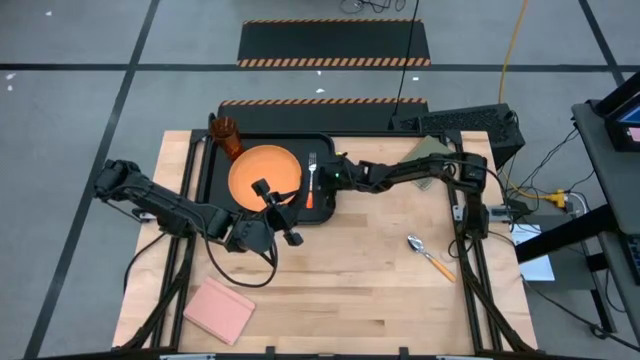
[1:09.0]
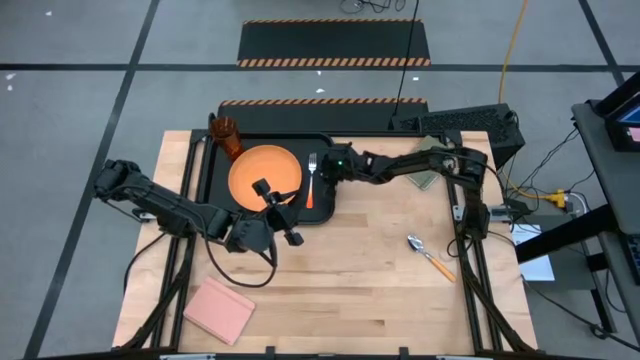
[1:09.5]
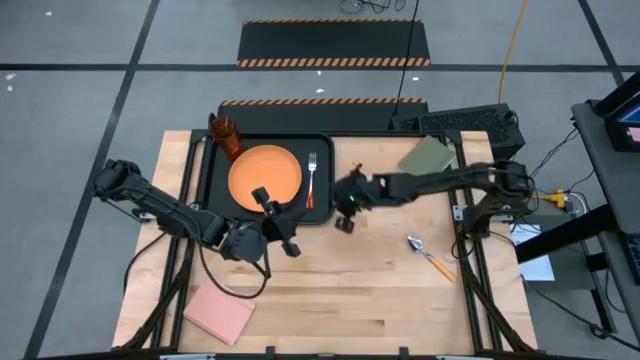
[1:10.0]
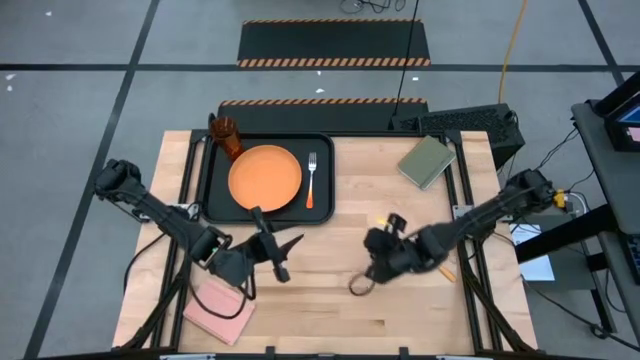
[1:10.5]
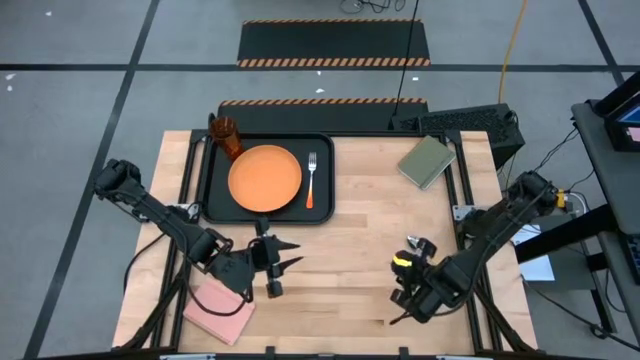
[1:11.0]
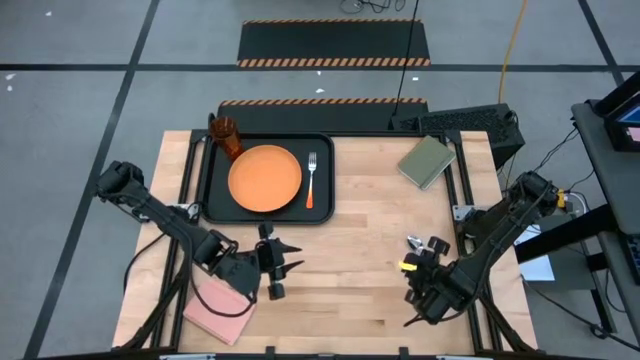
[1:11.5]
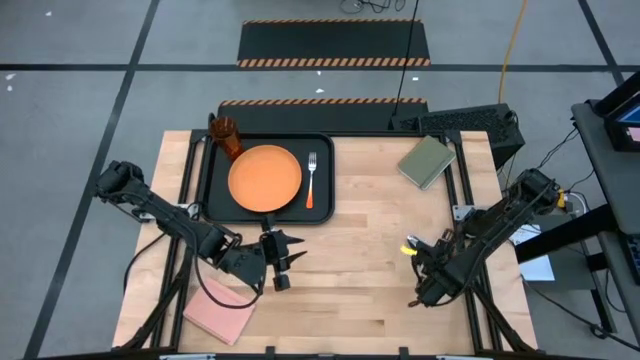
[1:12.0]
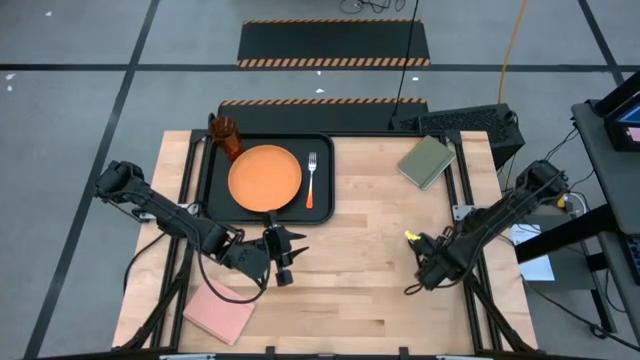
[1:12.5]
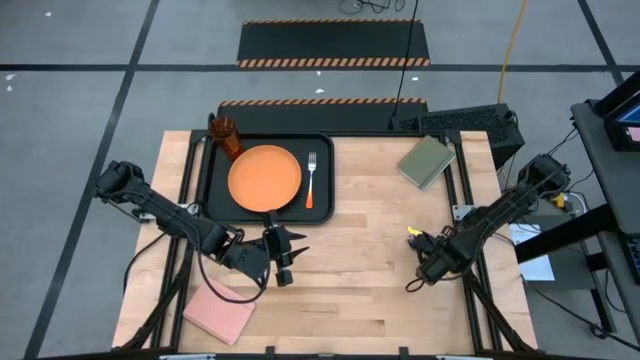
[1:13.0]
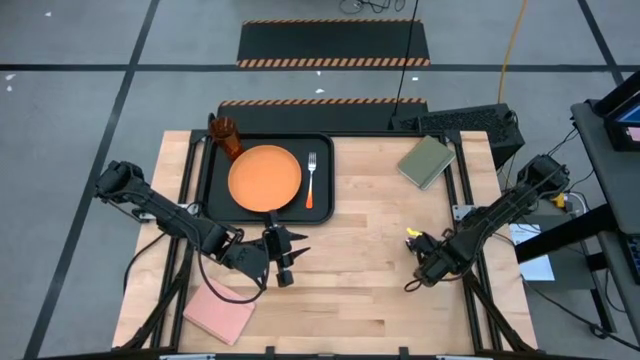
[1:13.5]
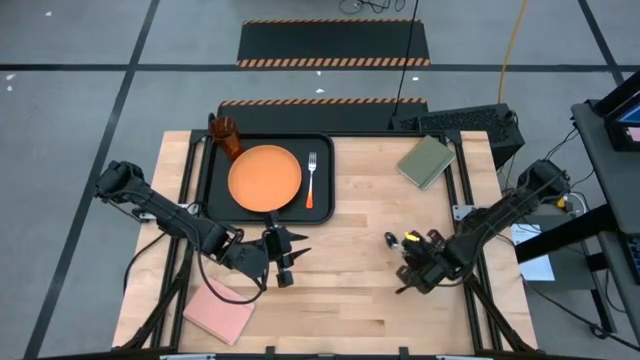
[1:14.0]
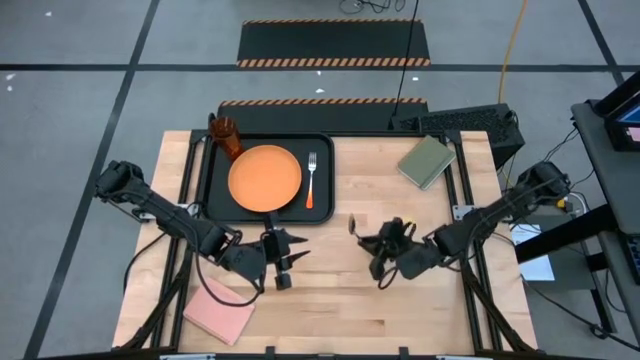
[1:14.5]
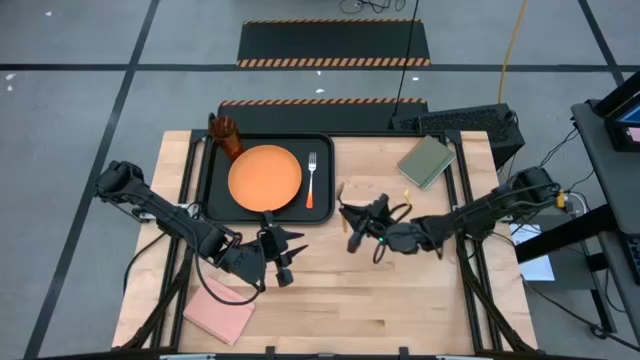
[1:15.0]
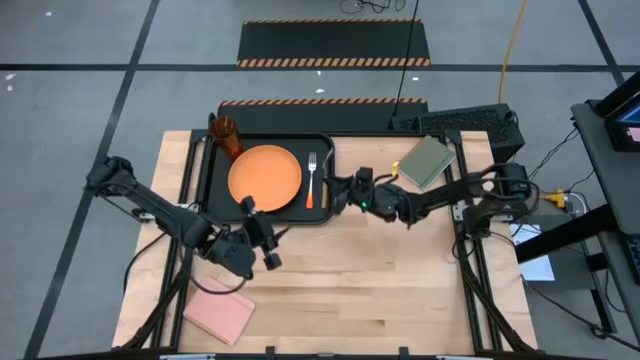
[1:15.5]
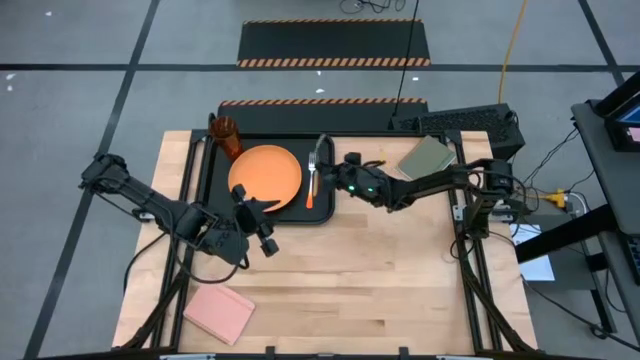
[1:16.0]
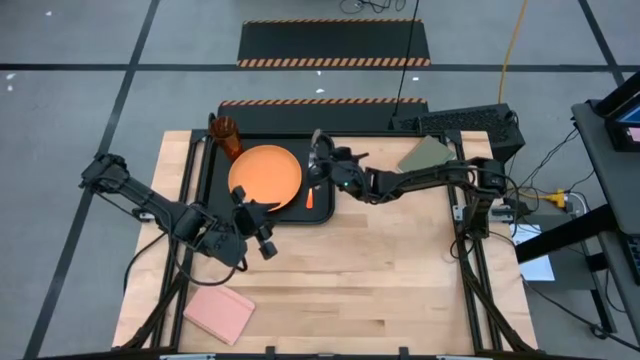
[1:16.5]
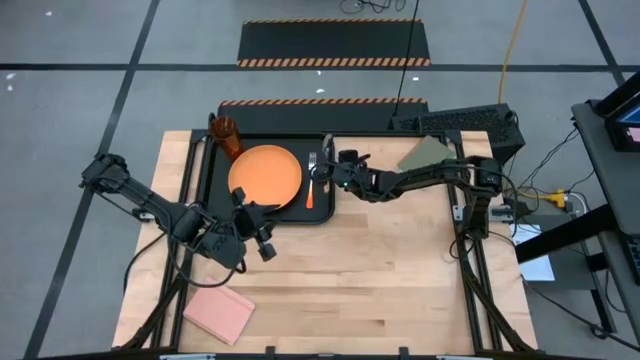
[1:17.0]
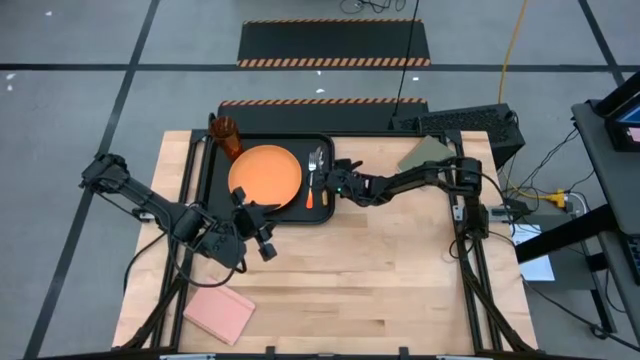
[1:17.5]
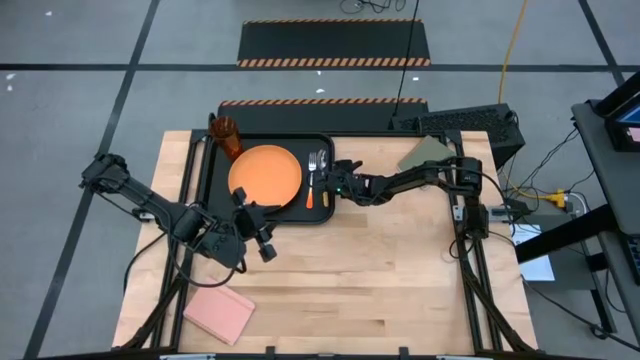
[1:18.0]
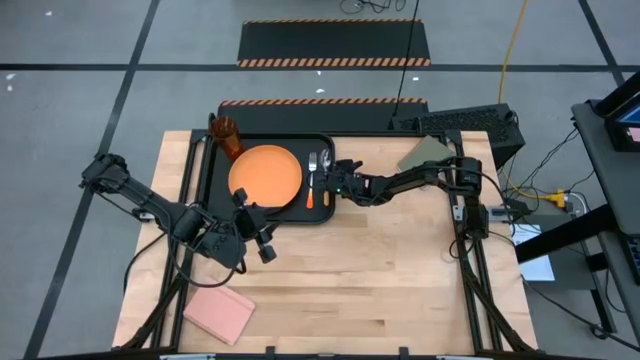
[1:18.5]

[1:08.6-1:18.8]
Task: Pick and place plate/cup/fork/spoon on tray
Put the yellow spoon on the black tray

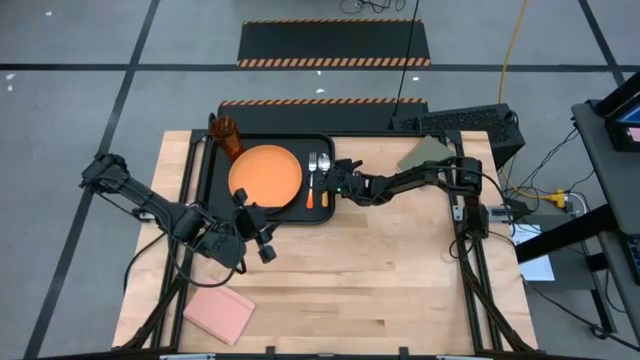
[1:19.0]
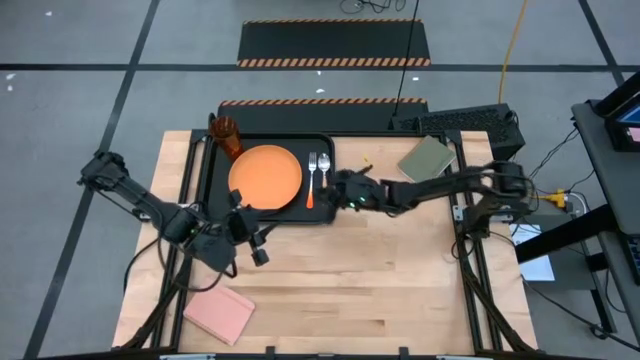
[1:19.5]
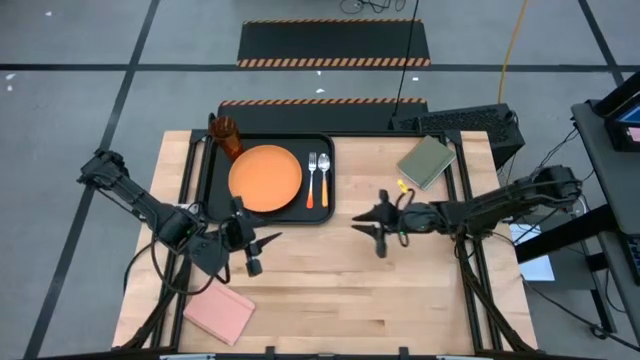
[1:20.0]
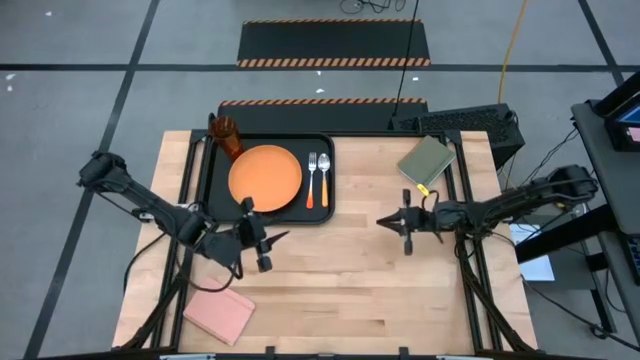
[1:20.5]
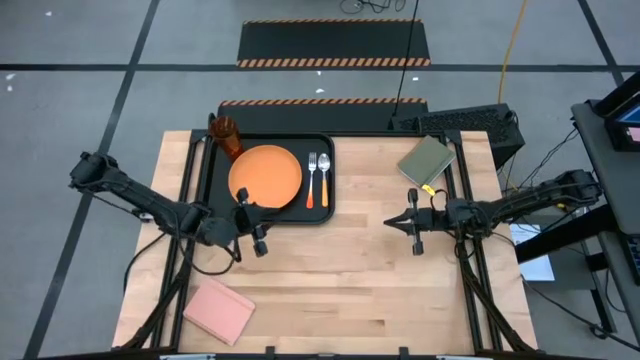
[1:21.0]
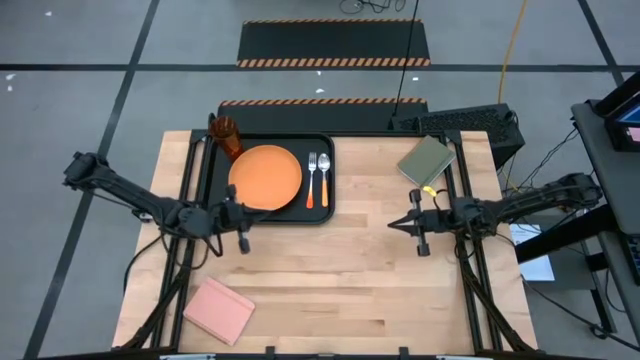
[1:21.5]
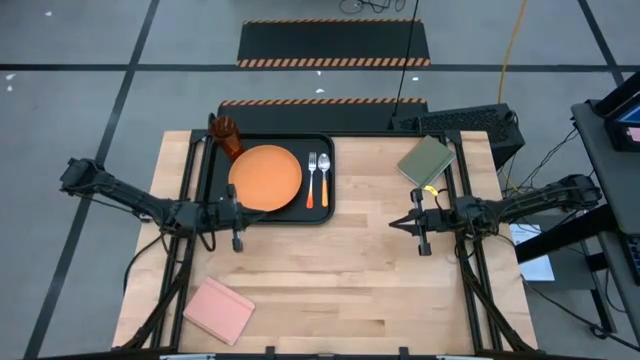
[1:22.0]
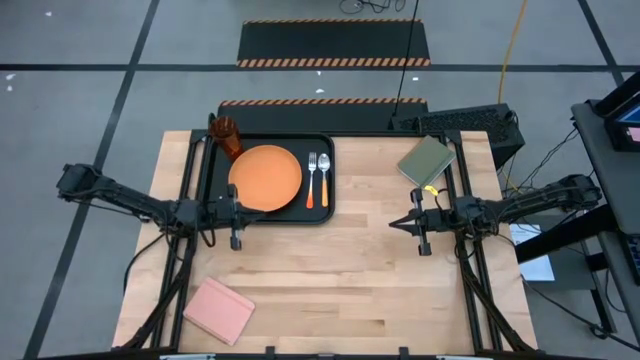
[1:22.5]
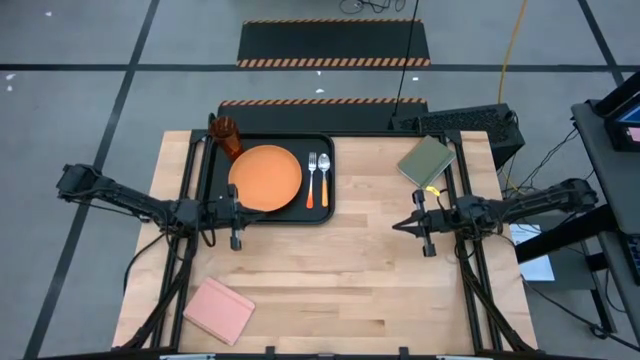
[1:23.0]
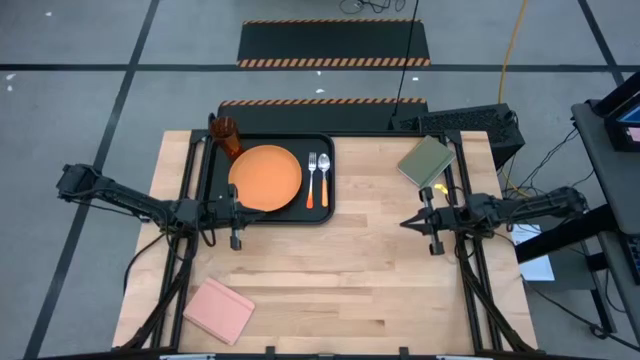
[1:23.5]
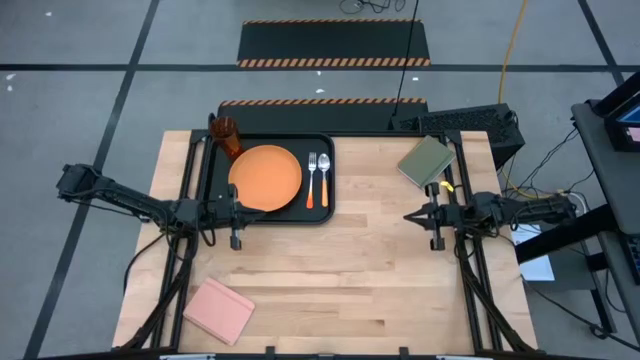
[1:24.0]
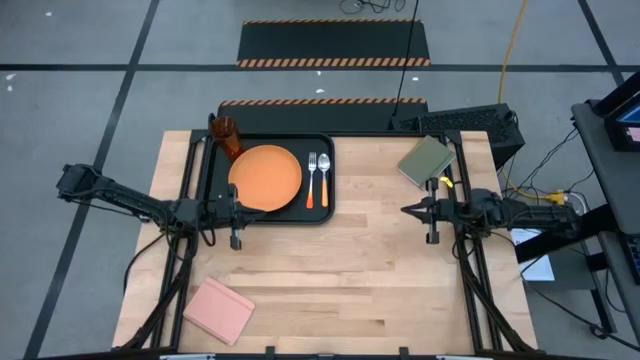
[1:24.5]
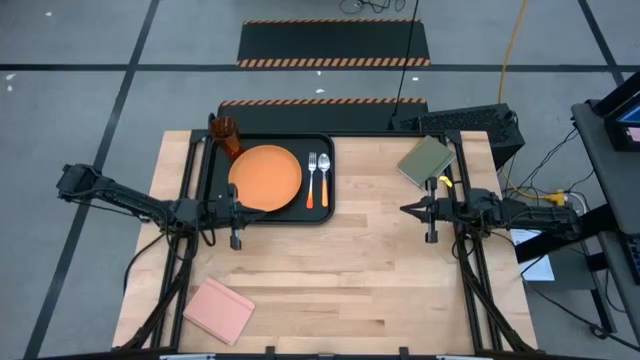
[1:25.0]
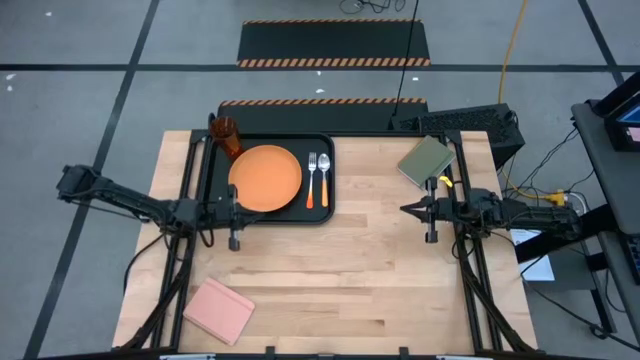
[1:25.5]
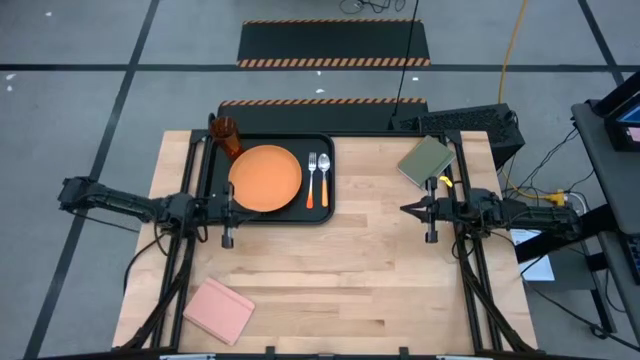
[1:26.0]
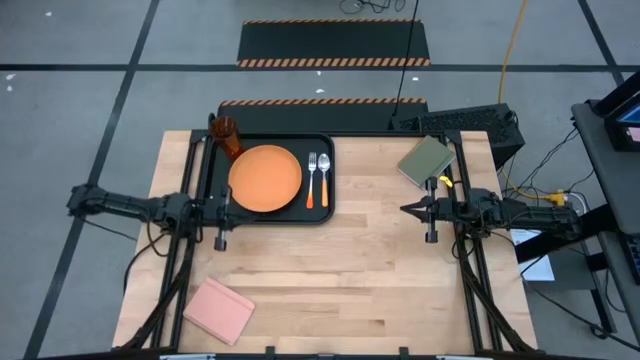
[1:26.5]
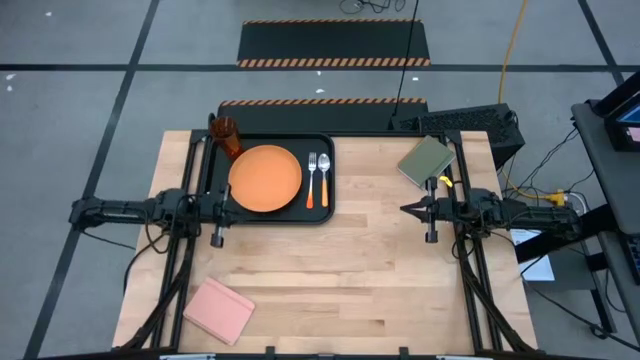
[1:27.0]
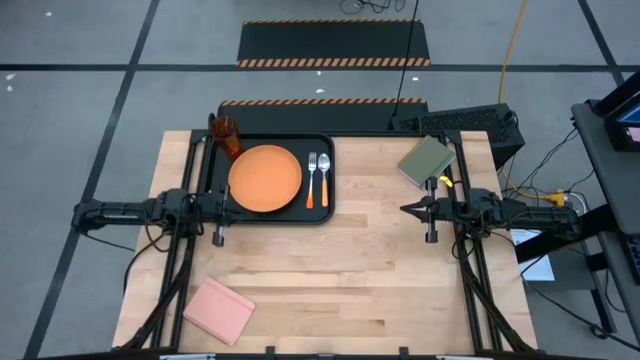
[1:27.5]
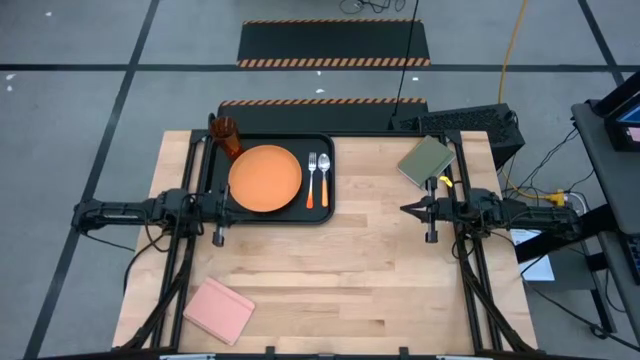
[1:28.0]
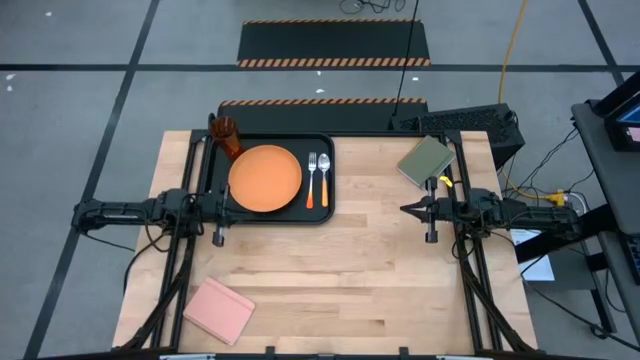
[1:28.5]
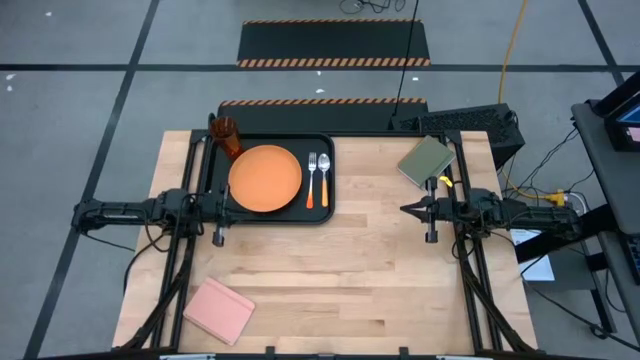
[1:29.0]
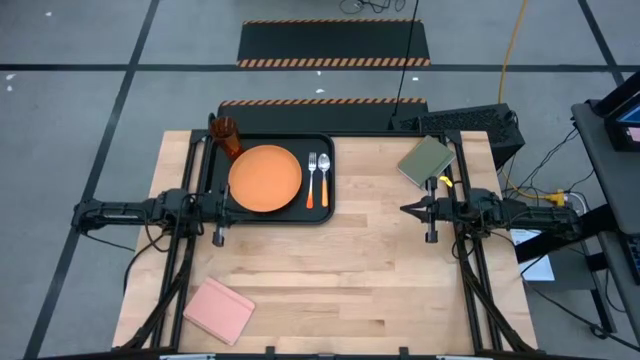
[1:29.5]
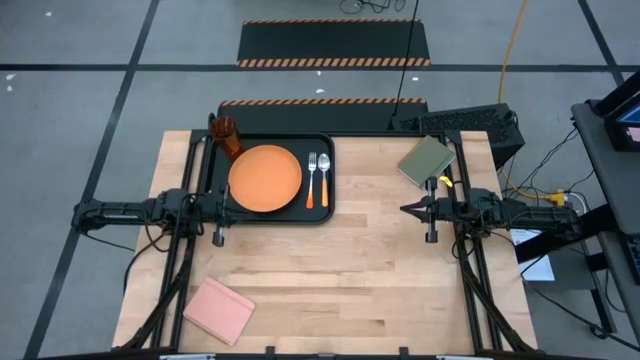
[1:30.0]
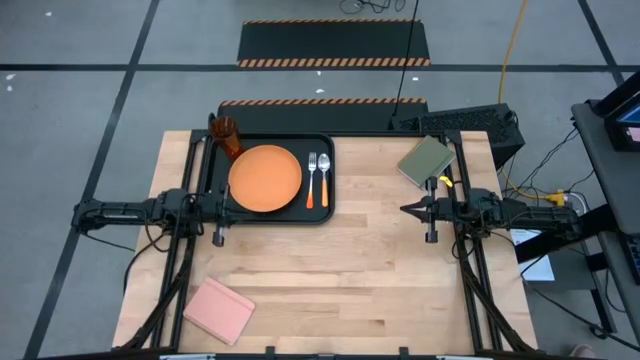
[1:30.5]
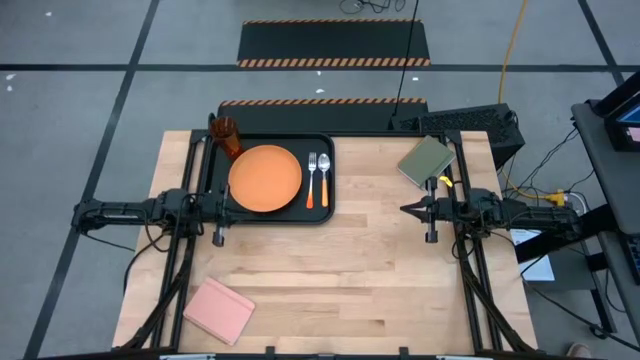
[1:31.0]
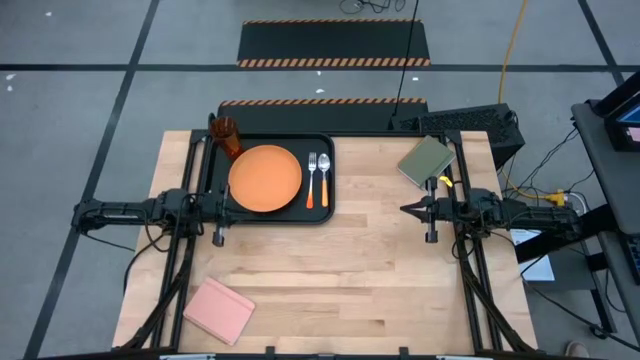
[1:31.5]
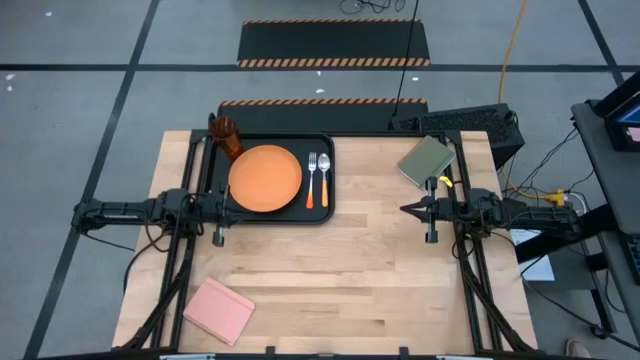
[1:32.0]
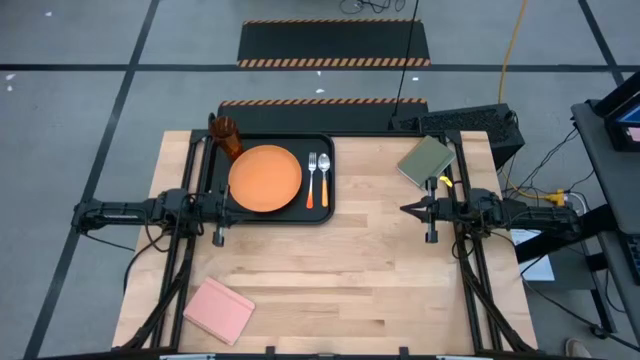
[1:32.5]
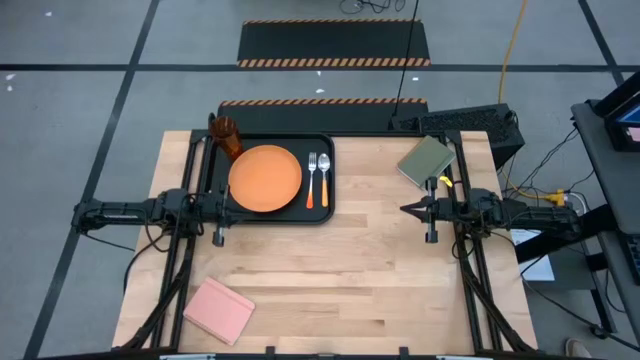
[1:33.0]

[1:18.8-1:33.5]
Return to Home Position
